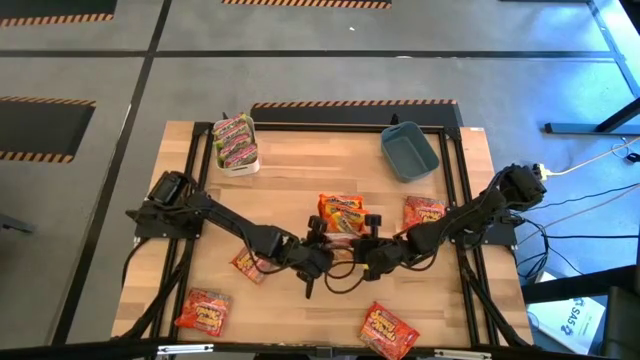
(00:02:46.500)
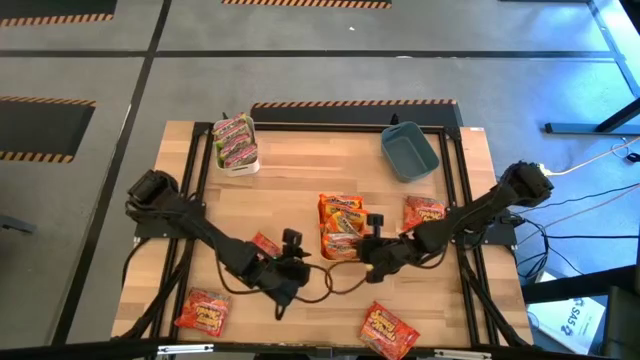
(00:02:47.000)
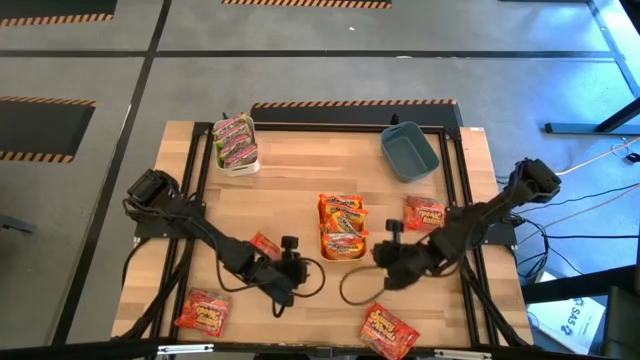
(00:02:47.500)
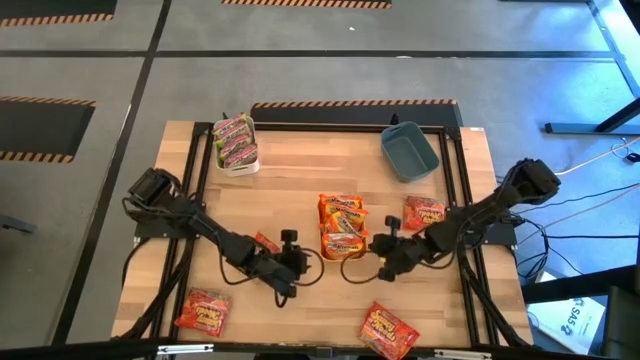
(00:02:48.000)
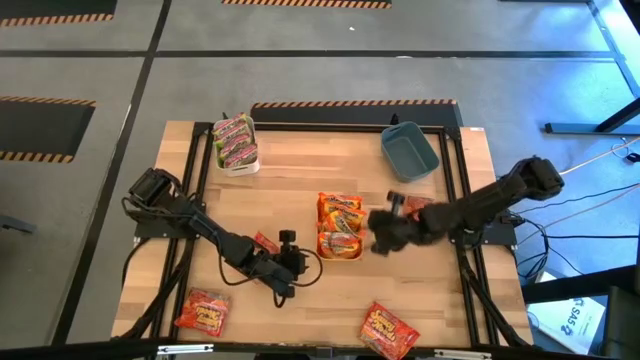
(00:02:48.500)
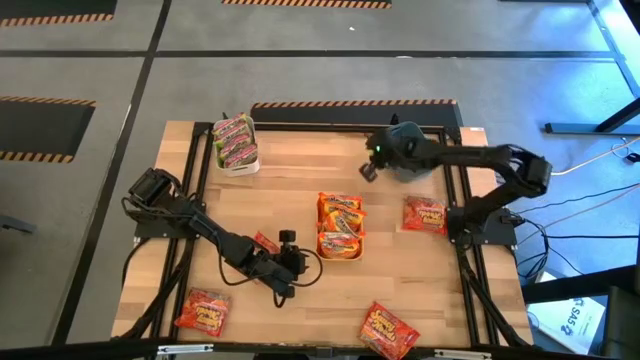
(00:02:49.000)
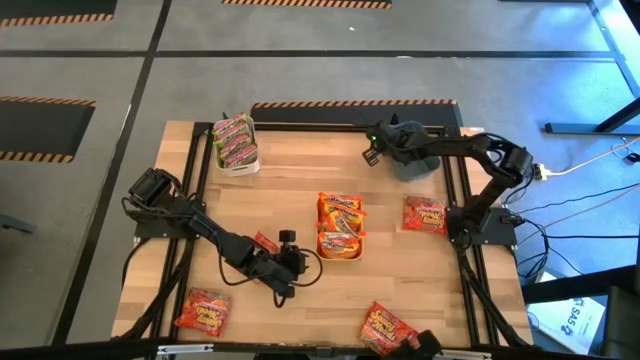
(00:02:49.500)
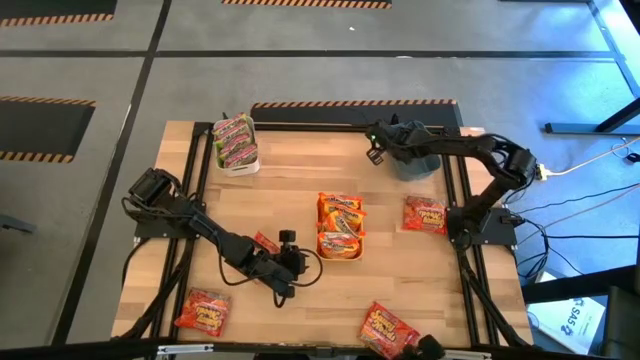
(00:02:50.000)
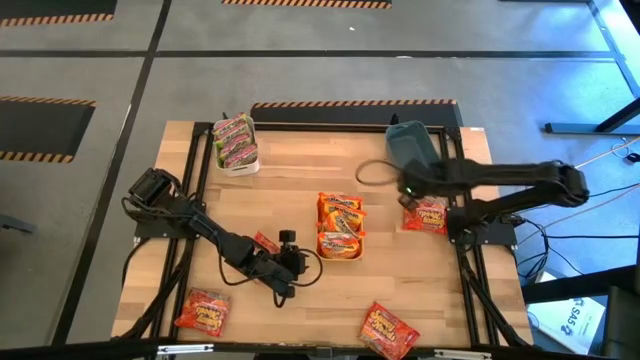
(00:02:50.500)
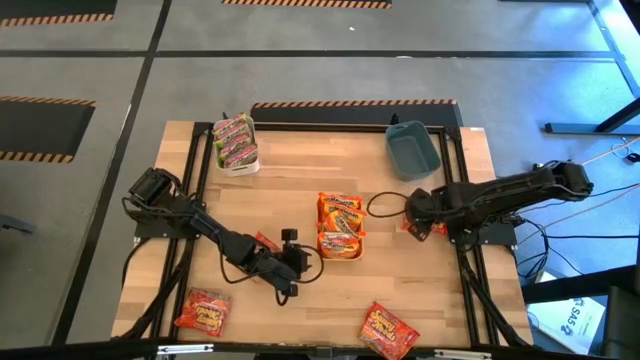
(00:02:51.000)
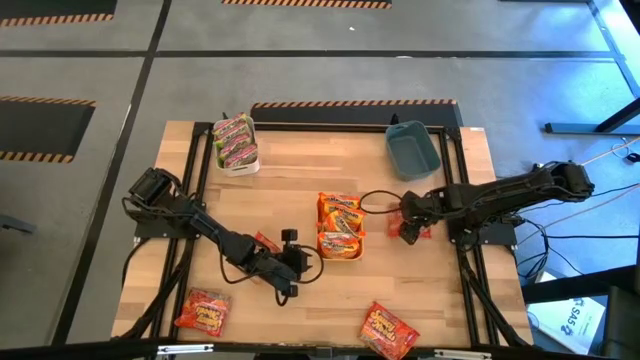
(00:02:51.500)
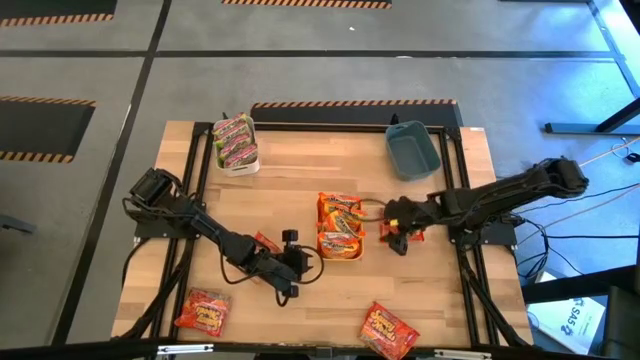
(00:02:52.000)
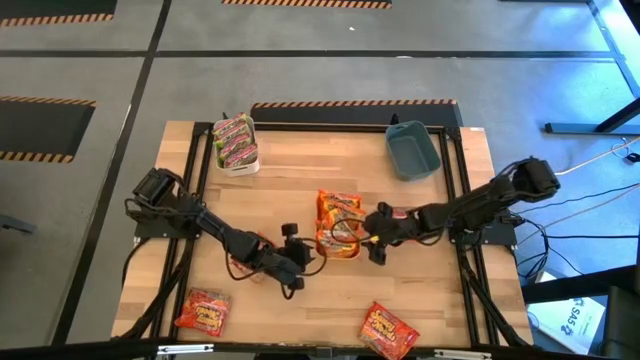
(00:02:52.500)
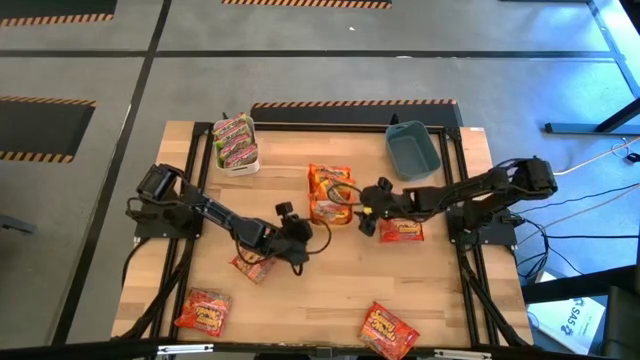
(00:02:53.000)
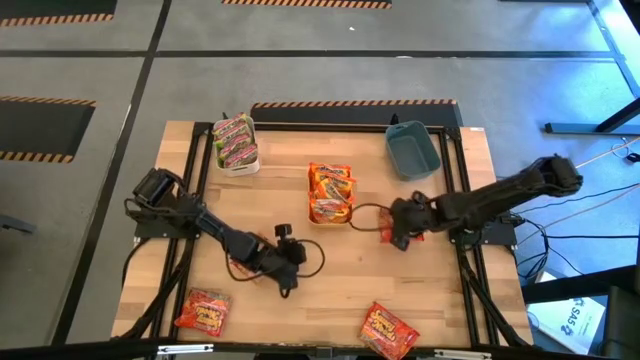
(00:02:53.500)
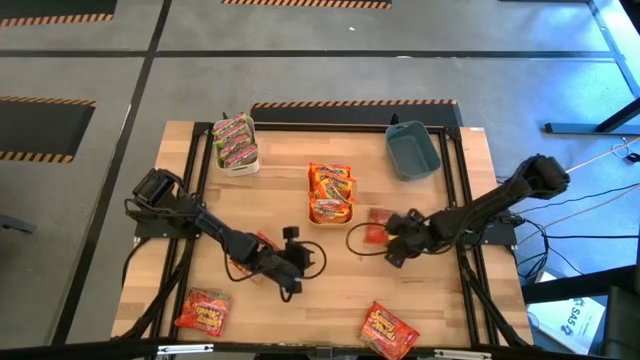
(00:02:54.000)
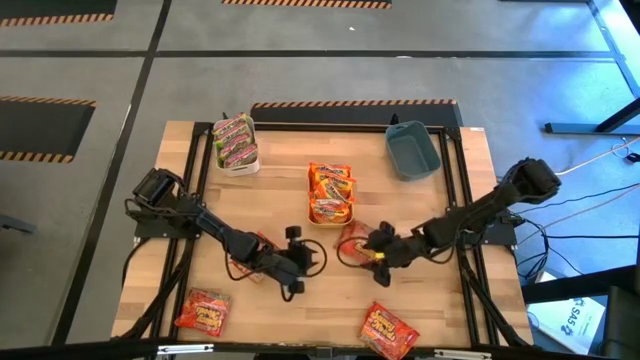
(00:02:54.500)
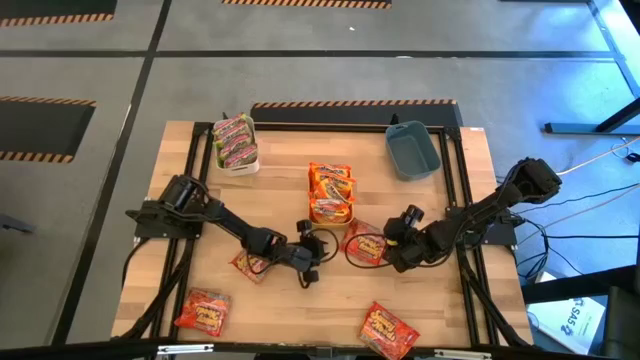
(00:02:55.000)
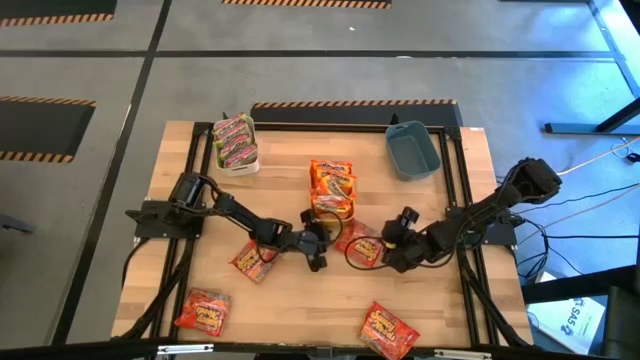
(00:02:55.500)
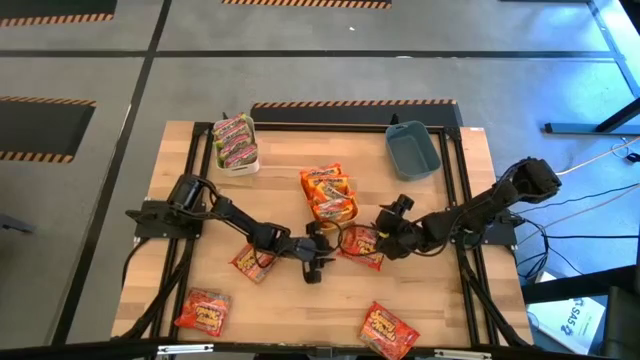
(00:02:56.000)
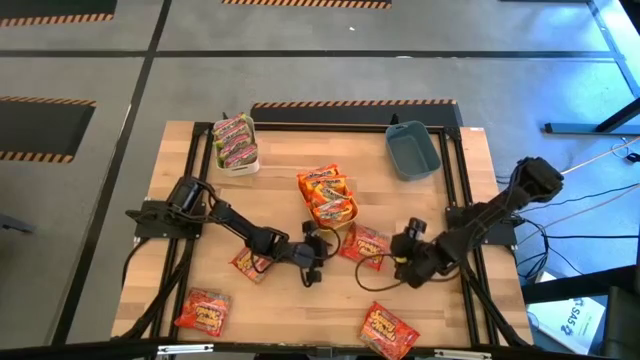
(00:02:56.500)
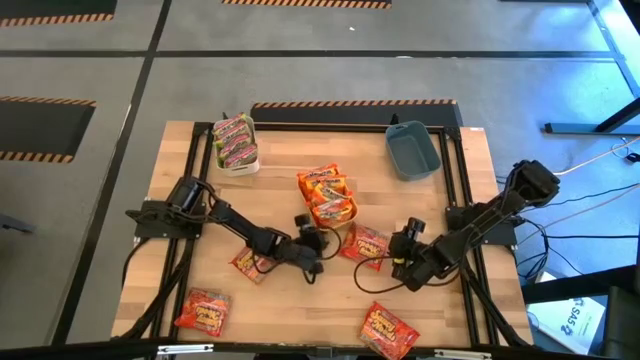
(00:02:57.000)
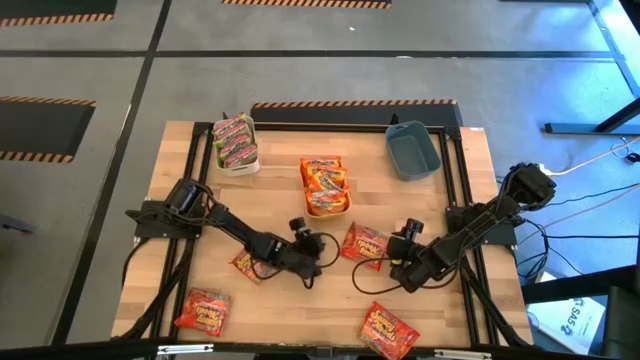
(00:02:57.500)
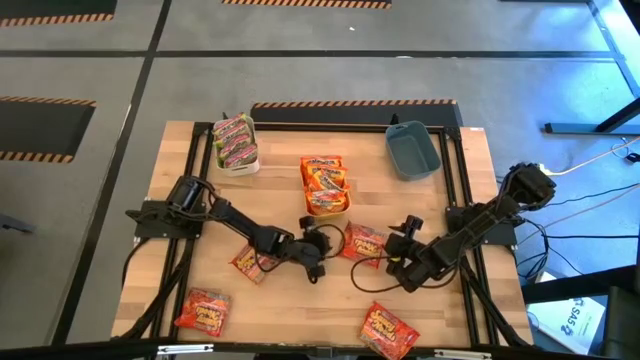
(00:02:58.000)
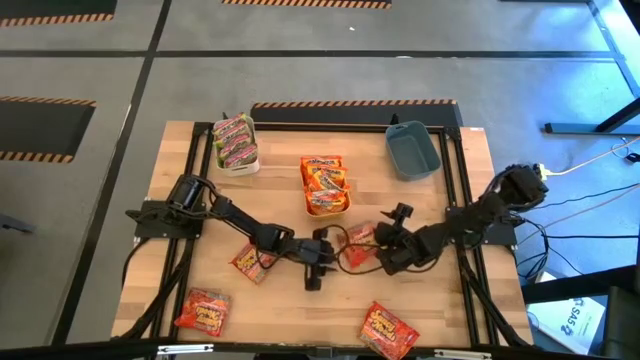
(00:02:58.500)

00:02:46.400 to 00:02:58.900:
Task: Sort Maruchan noodles
Put the top right red noodle pack into the green bin

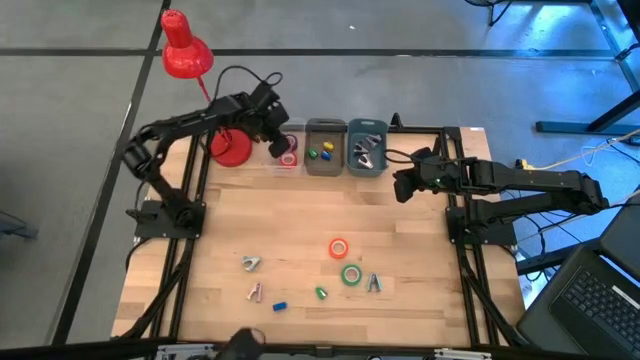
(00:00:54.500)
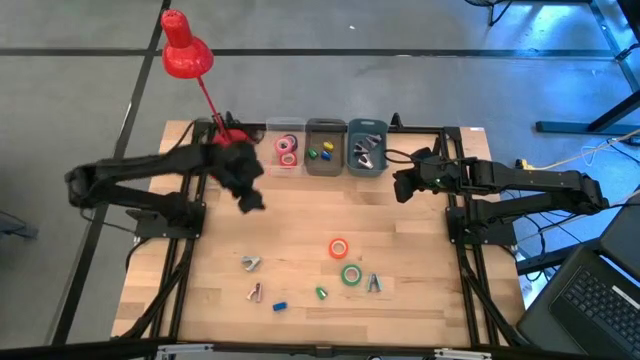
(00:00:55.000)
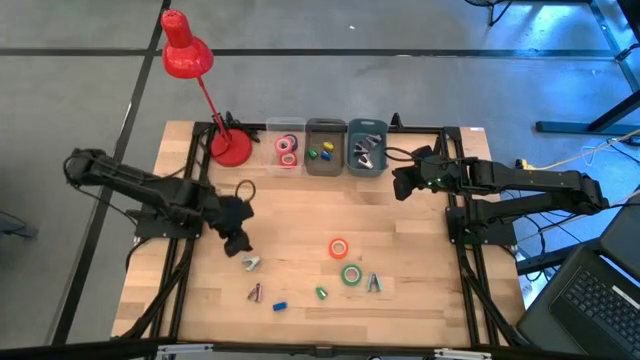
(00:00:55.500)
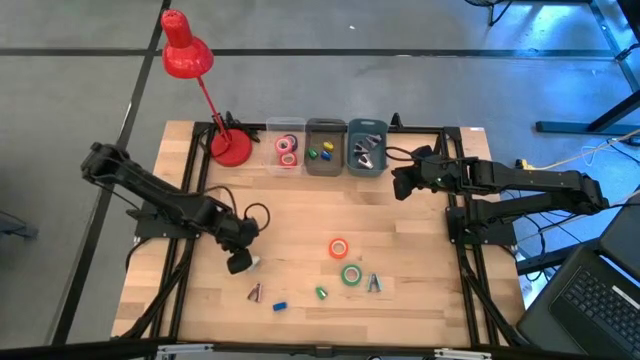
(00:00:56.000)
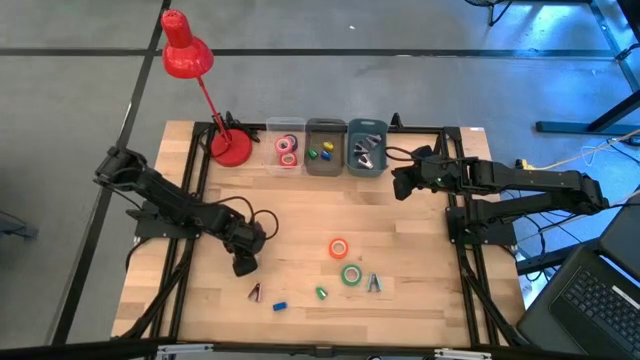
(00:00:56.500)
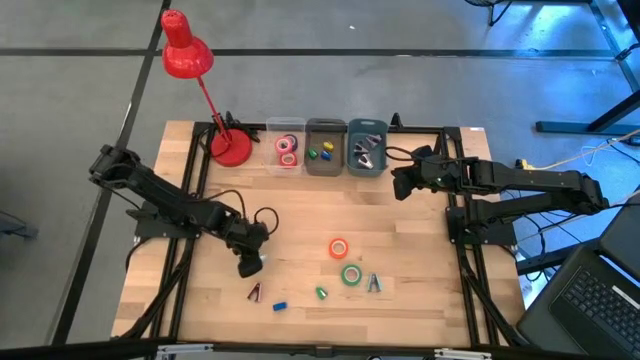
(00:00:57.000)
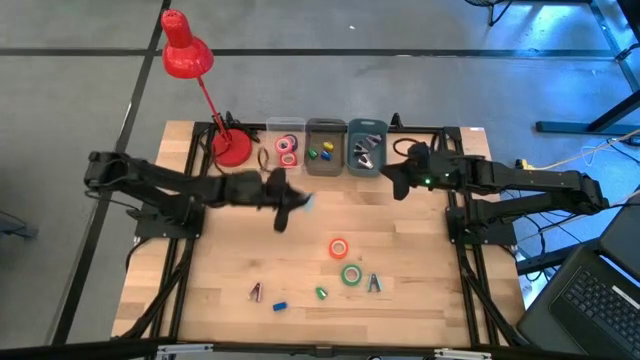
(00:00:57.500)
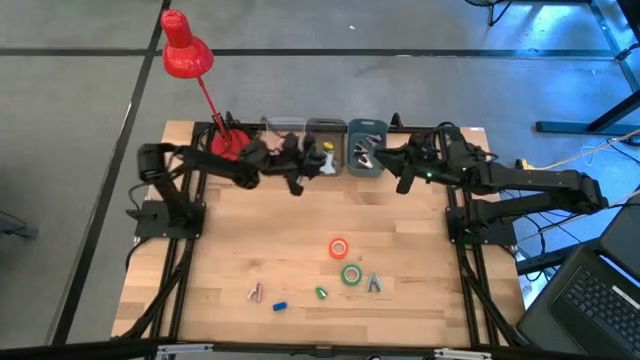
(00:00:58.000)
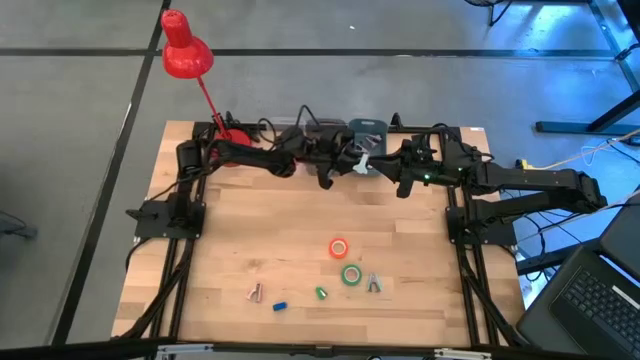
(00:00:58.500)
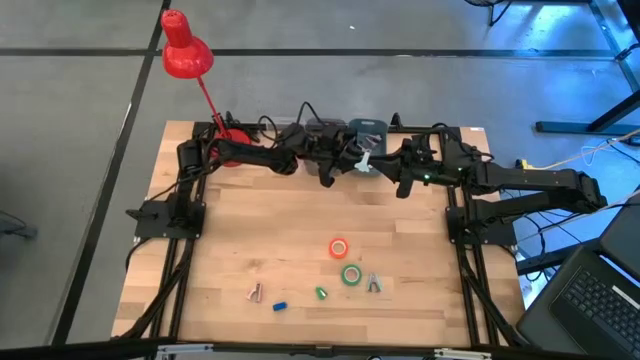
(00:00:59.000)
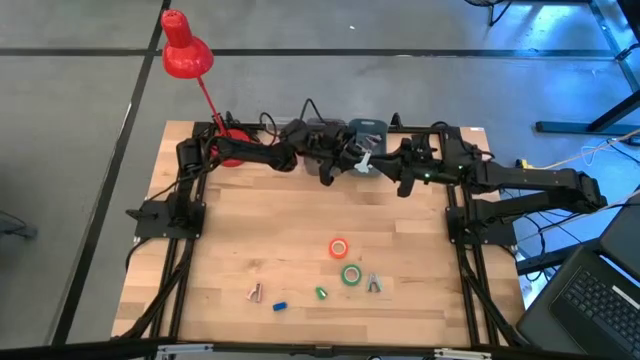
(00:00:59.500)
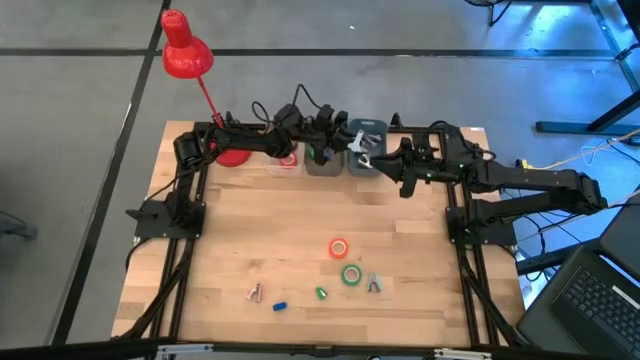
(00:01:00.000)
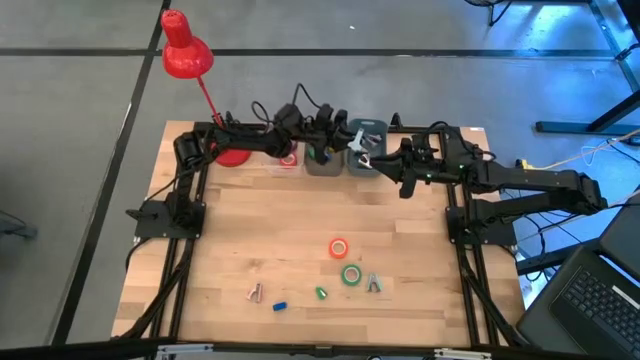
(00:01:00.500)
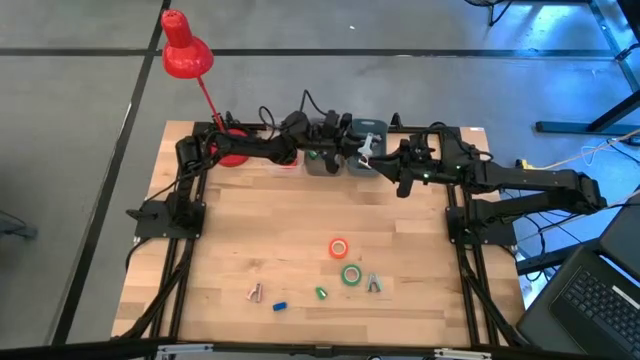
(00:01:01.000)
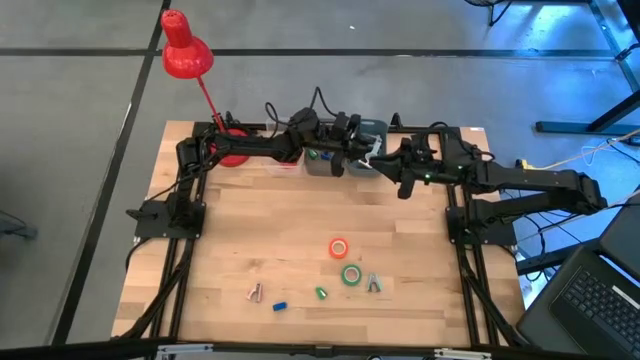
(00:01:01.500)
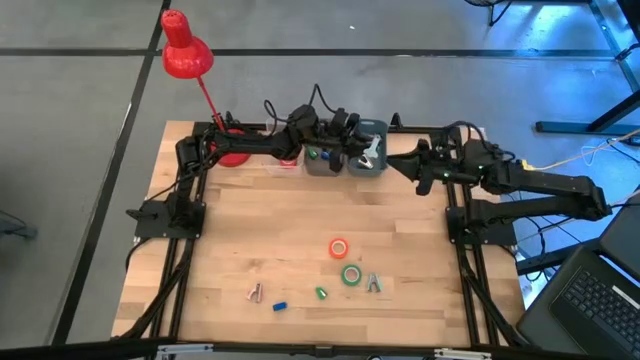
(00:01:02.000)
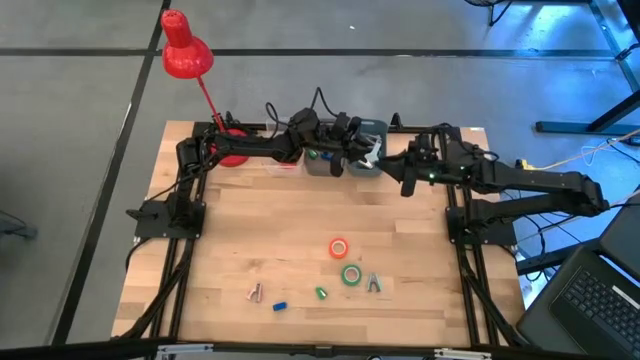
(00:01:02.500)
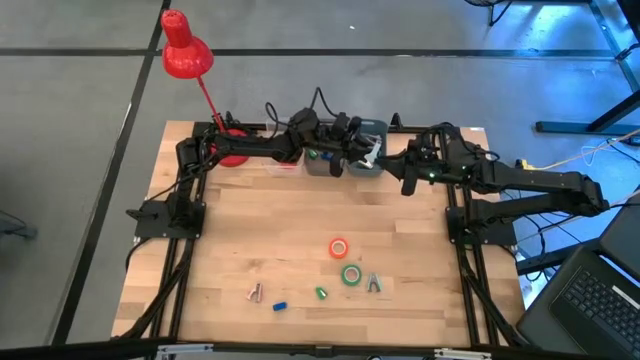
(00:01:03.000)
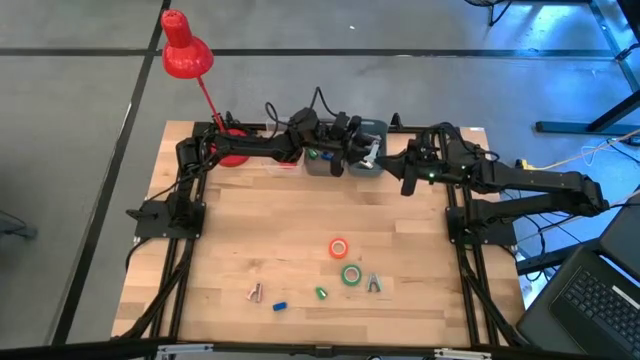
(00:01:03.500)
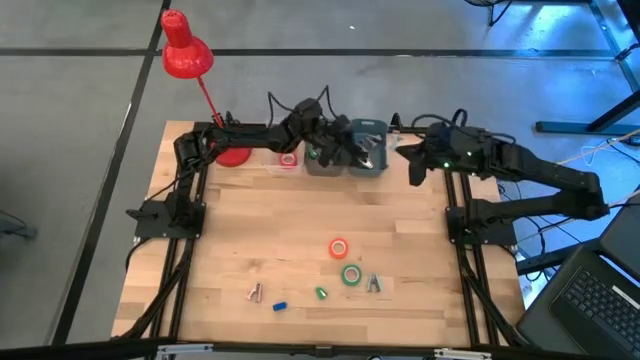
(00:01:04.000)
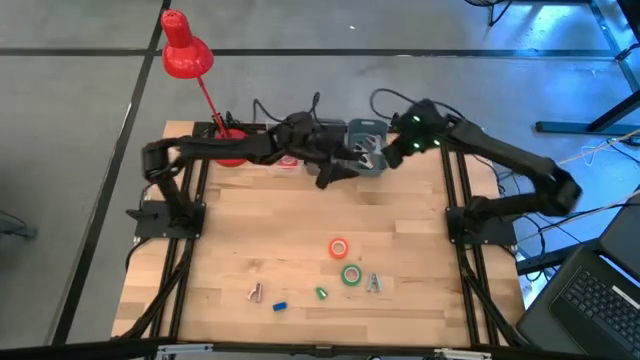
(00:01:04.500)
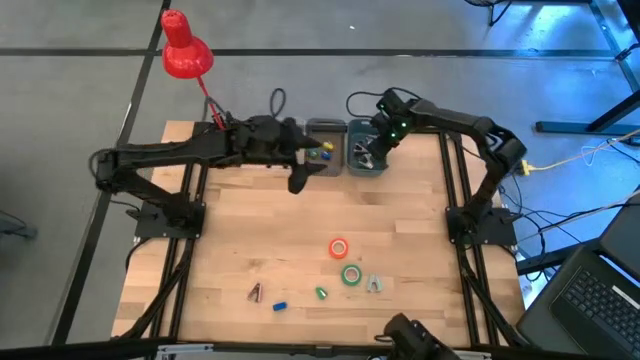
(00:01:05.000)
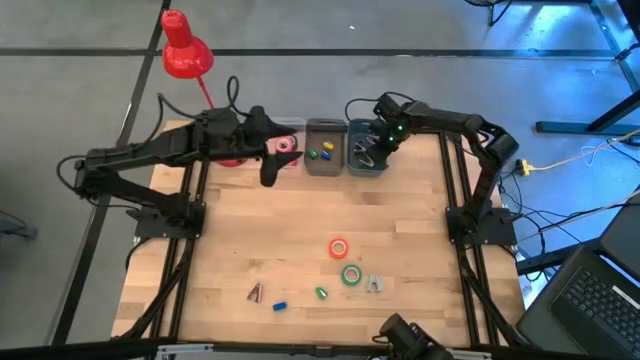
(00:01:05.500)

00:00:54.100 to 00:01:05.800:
Task: Pick and place Stapler, Stapler remover, tape
Put the left light blue staple remover into the blue bin
